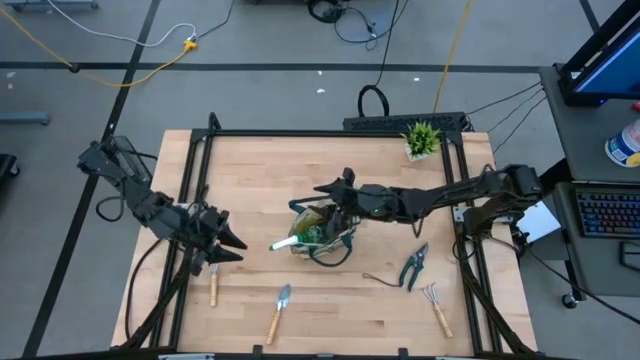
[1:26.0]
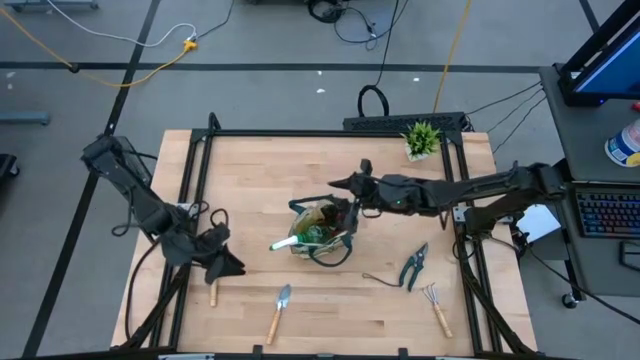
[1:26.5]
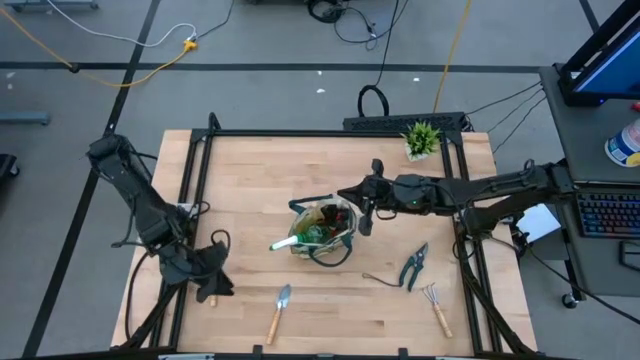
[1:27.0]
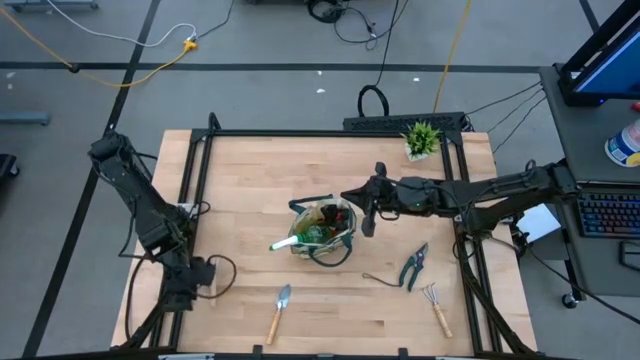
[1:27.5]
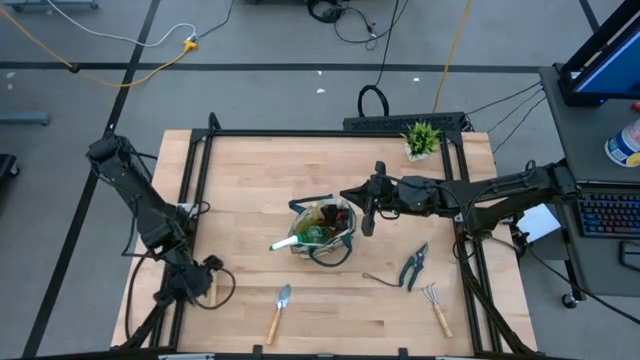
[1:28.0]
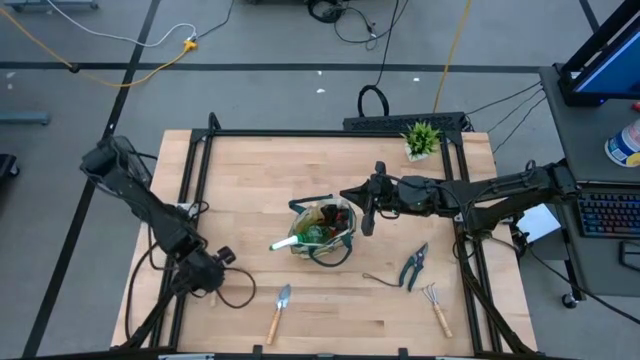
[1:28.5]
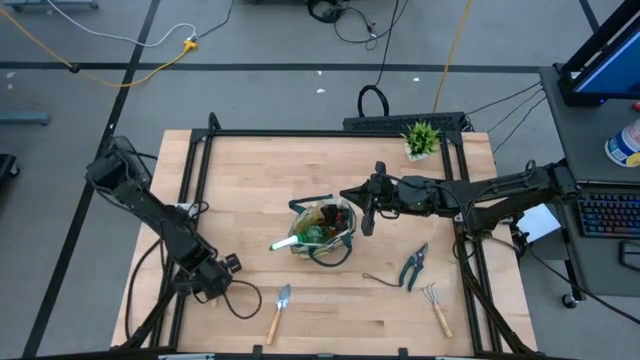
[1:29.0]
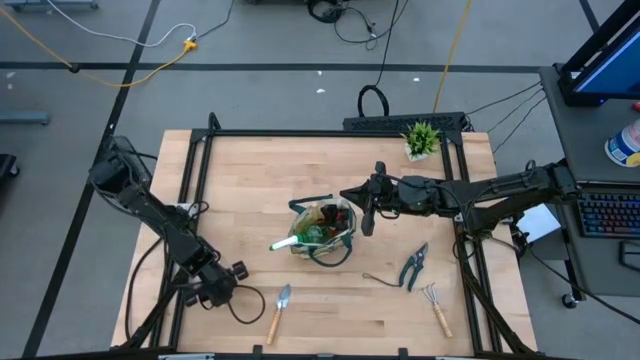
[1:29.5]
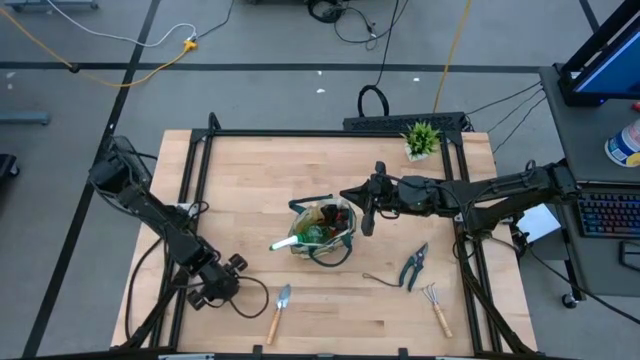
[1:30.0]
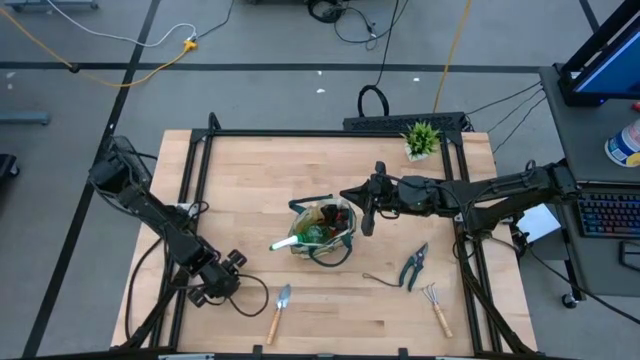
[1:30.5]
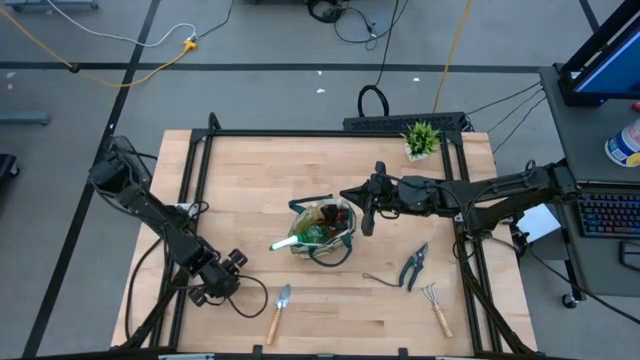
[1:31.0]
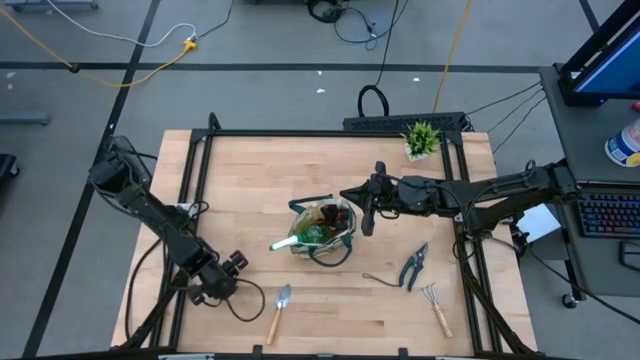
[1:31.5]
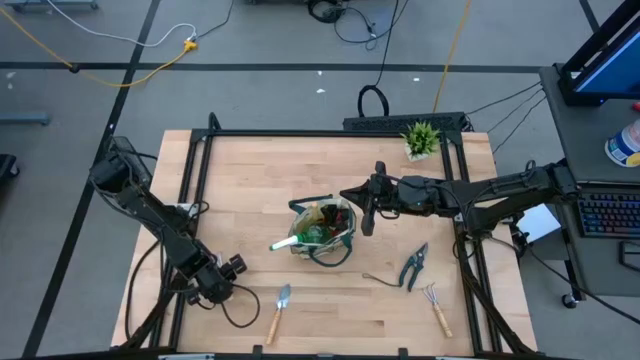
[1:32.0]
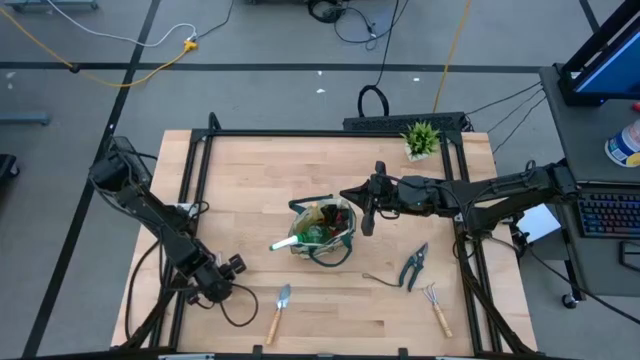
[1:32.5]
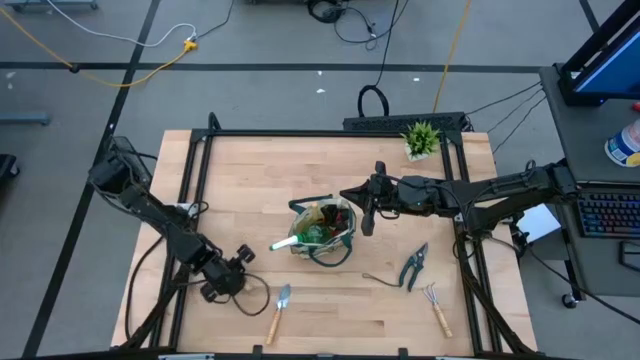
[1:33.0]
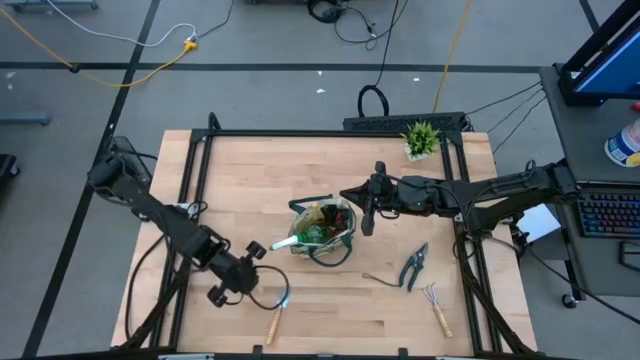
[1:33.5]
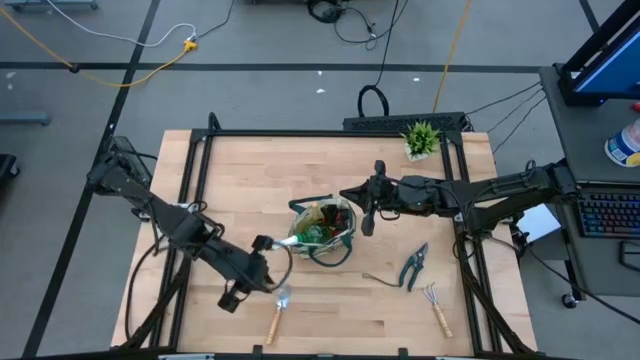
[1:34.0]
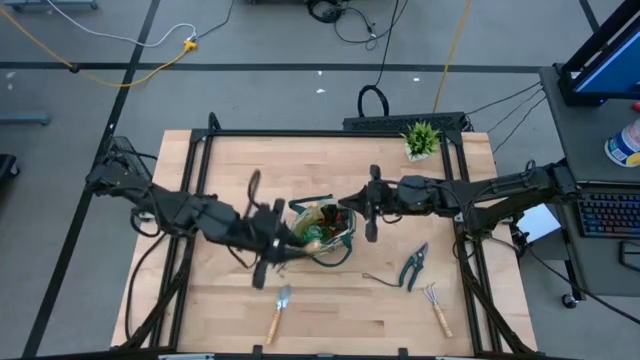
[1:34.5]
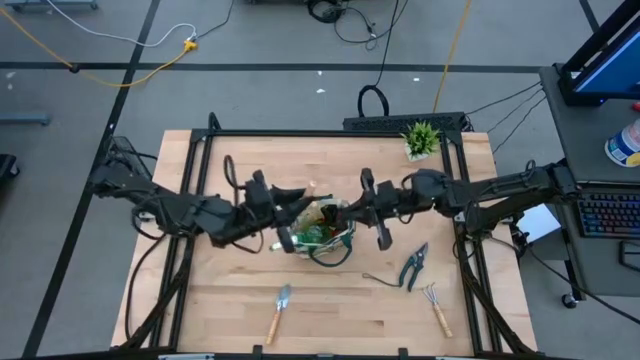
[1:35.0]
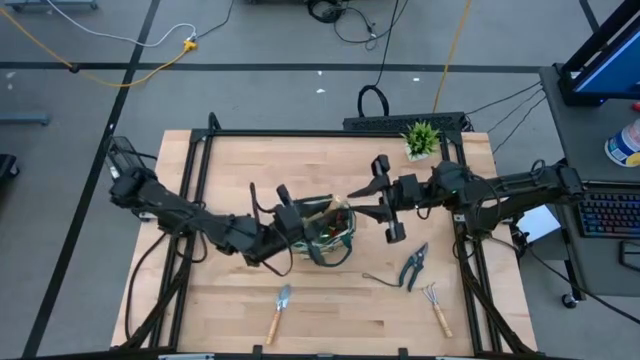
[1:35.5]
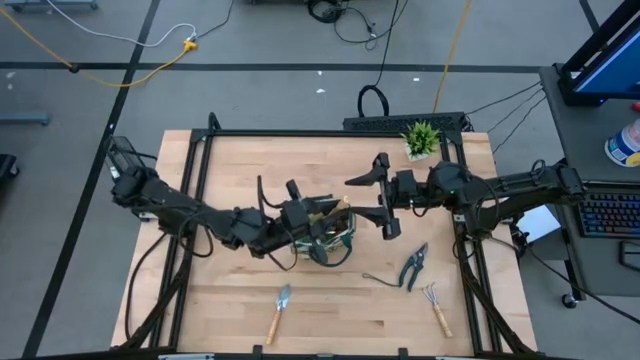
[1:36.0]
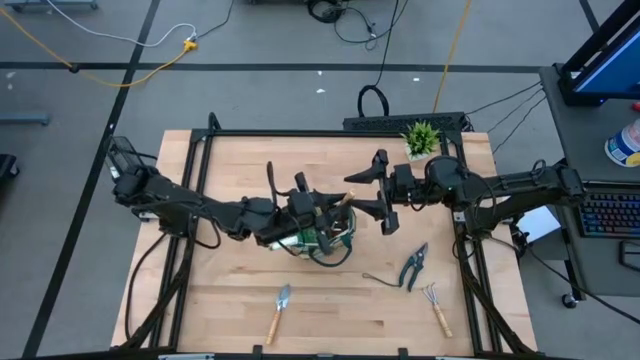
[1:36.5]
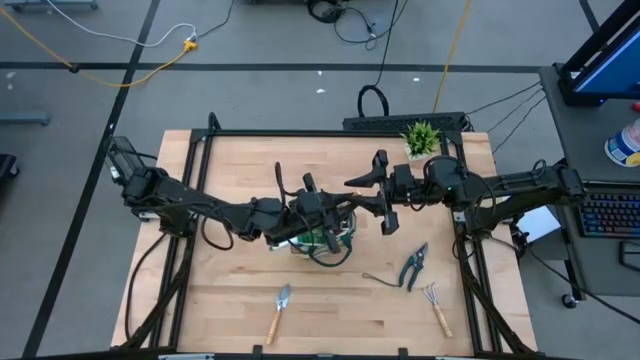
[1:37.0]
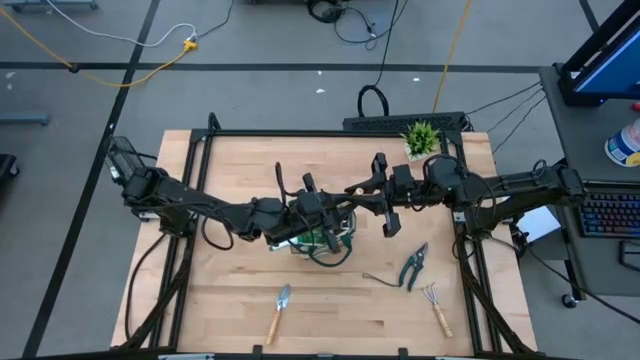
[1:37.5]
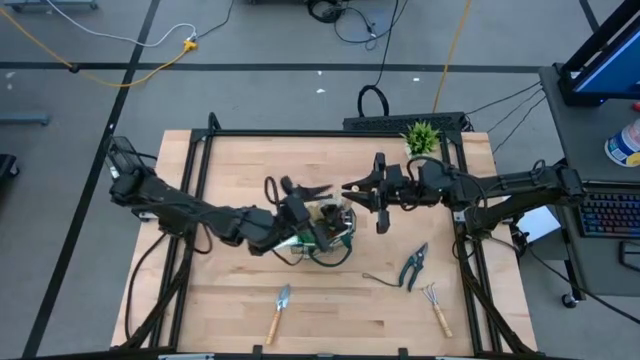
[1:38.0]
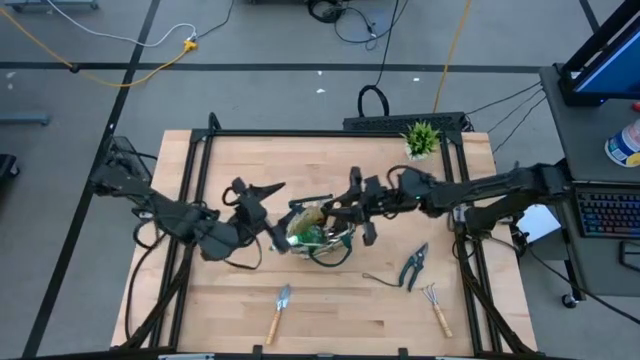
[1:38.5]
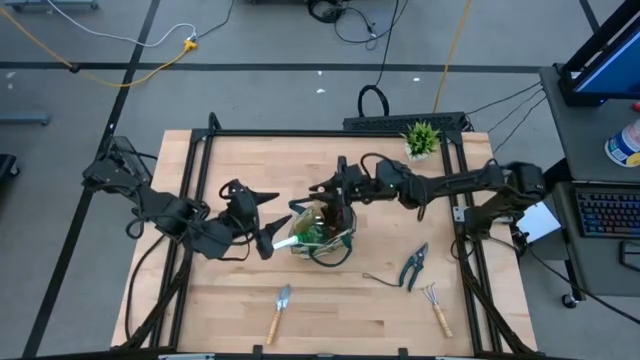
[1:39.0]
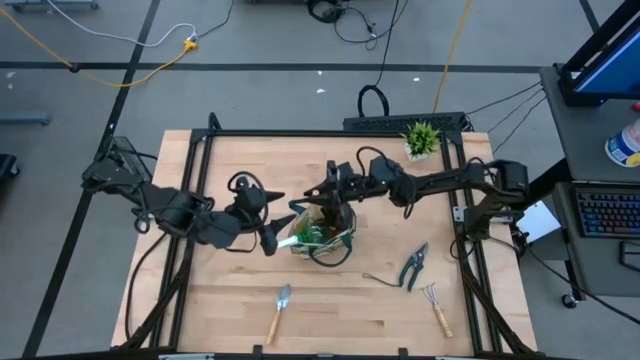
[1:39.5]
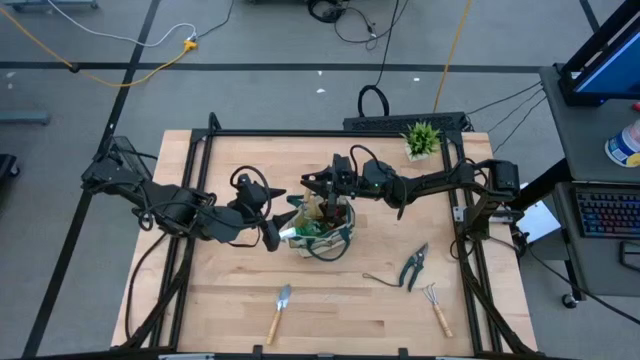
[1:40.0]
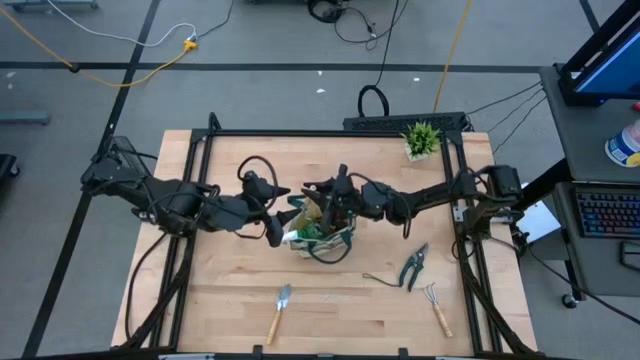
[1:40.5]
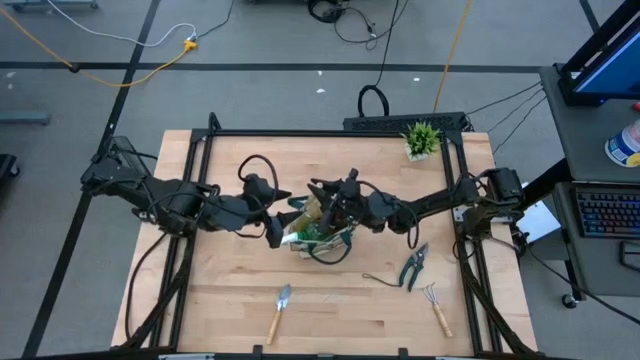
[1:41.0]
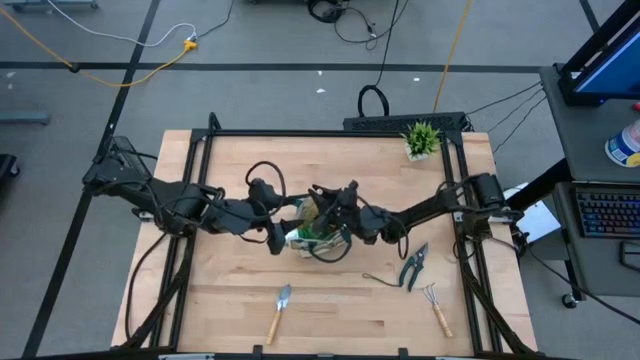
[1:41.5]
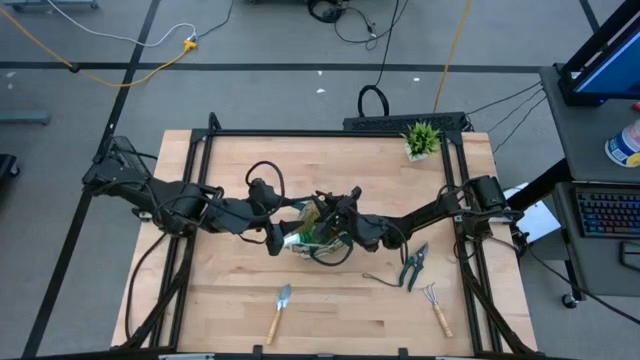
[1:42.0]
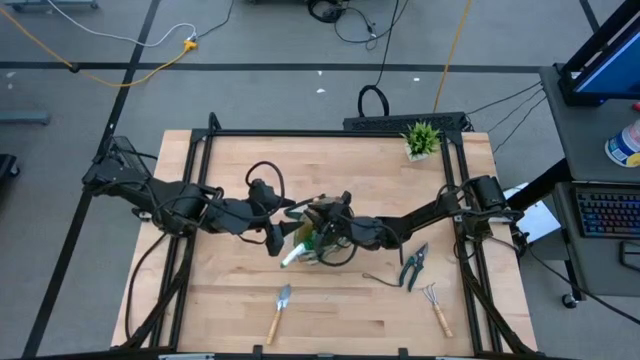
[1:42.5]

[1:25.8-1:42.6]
Task: Pick & Place Garden tools in Gardening bag
Put the left hand rake into the gardening bag
